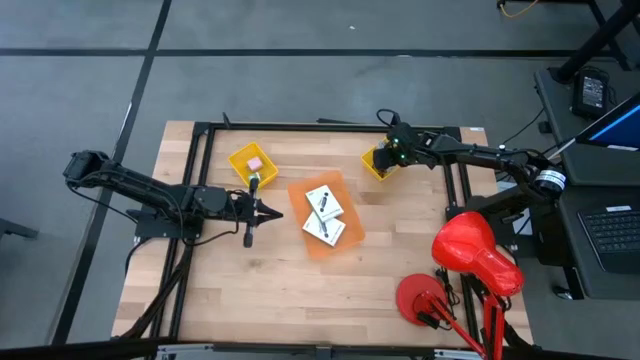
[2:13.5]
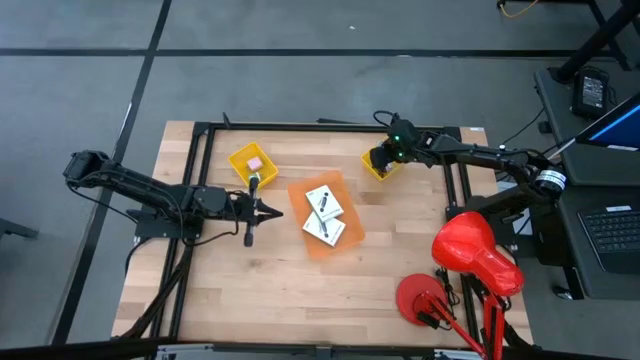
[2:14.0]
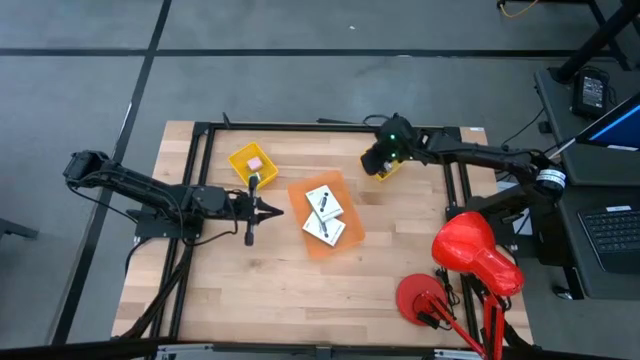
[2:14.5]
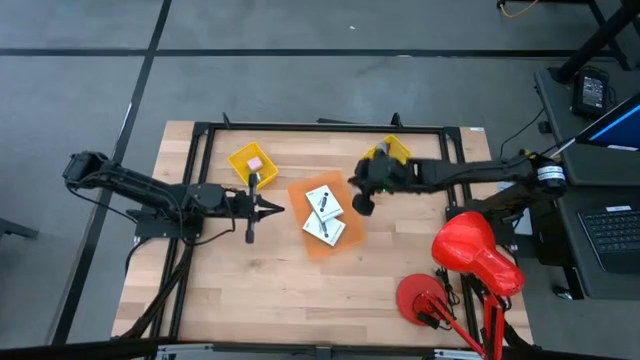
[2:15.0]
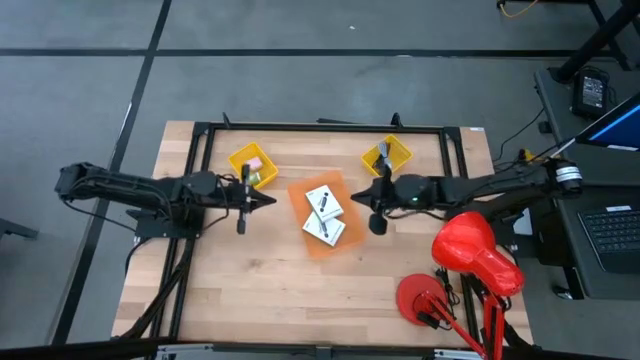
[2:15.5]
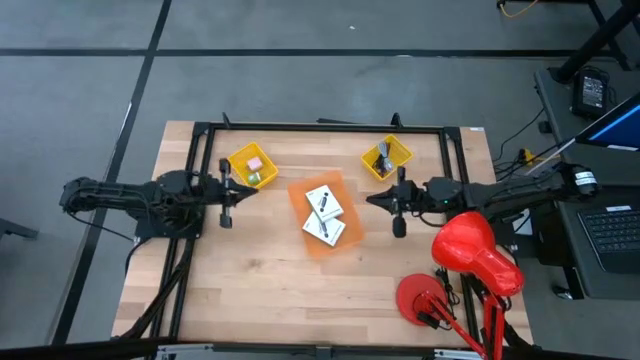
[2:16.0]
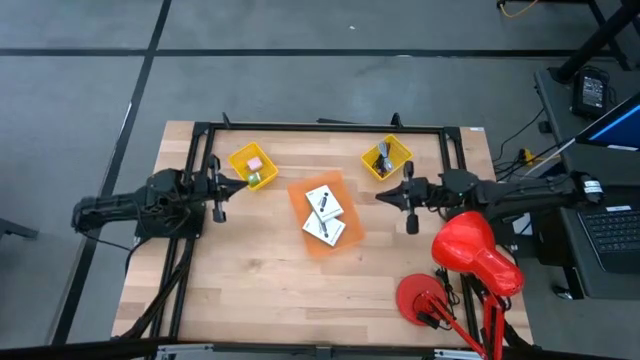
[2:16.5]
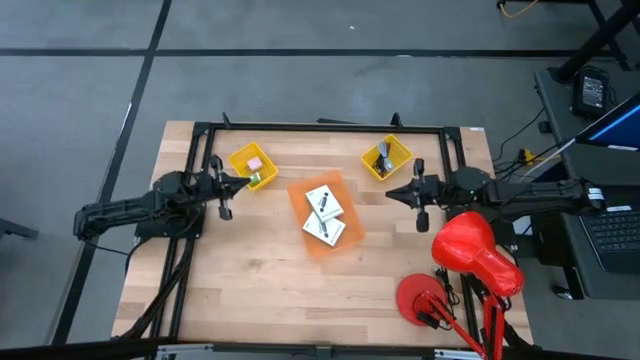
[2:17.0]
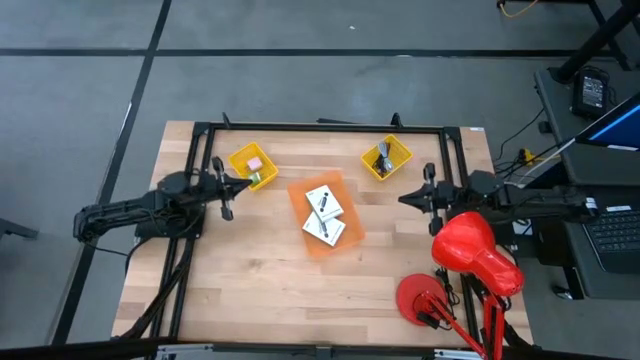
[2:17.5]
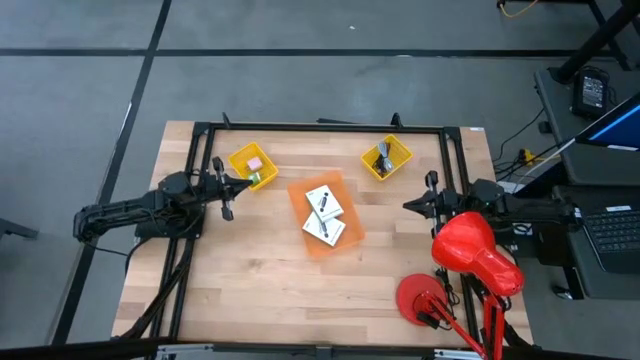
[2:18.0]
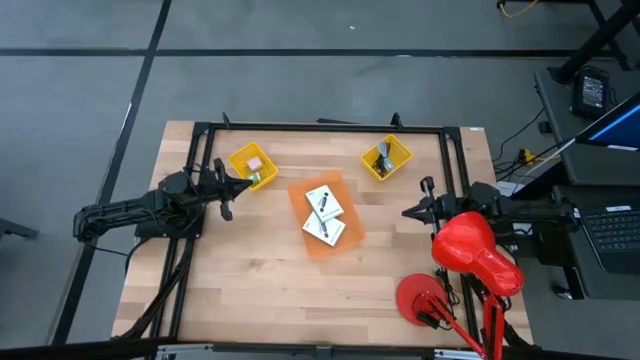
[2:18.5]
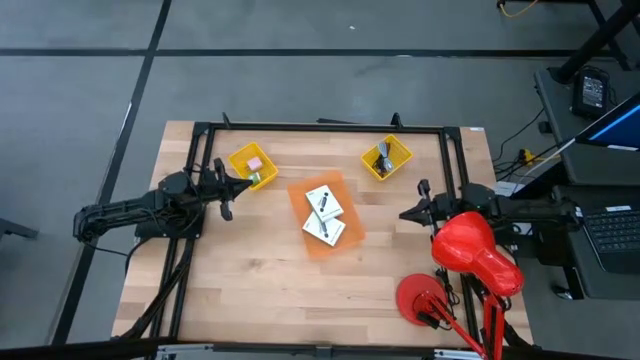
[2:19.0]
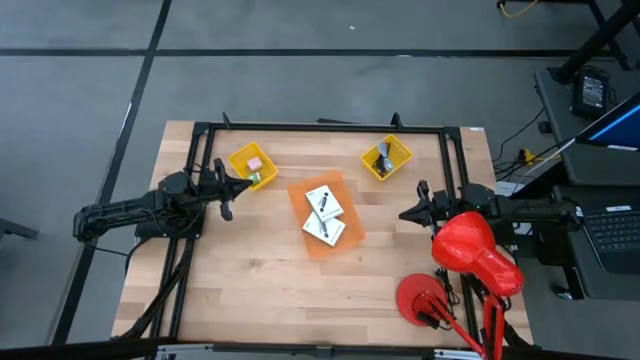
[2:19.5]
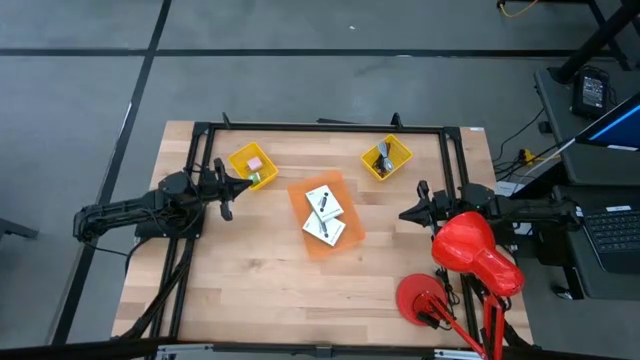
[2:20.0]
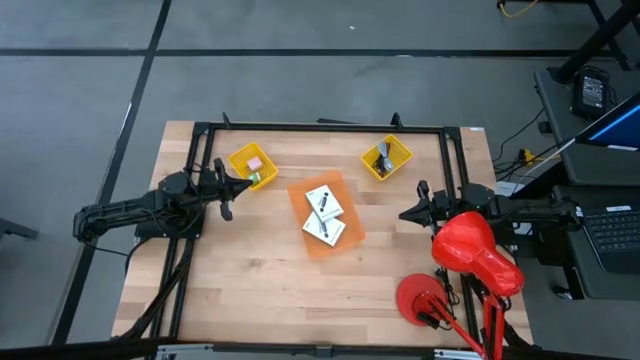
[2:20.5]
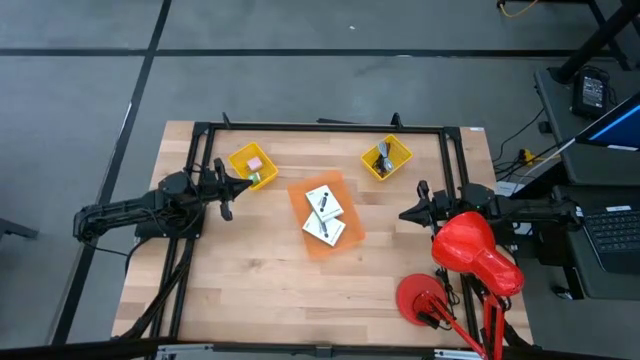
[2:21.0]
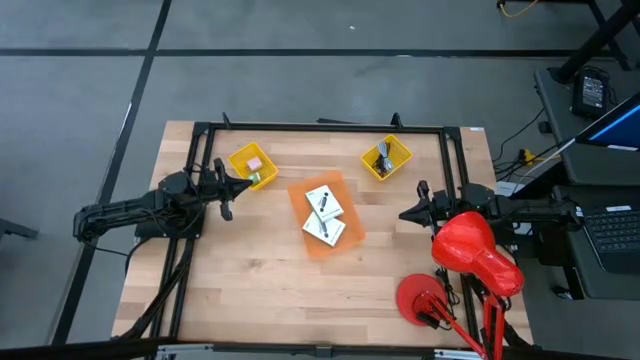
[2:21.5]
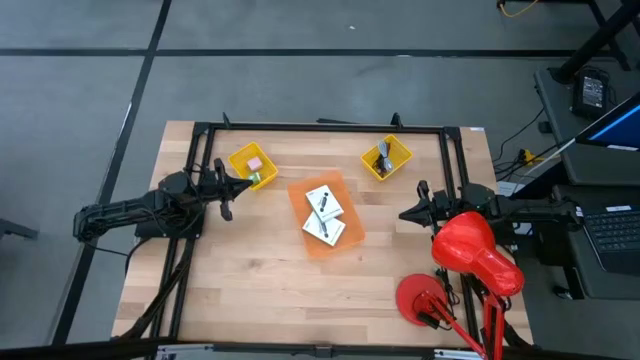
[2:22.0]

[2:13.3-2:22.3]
Task: Pick and place items into bin
Return to Home Position

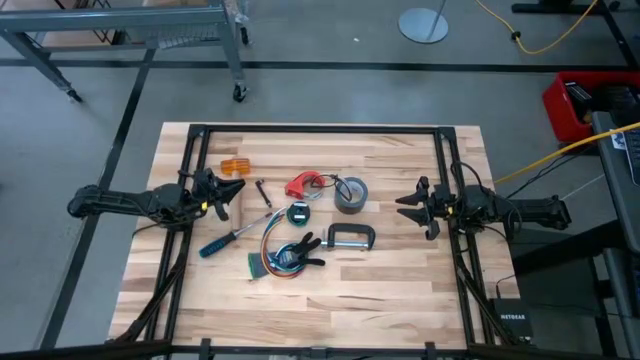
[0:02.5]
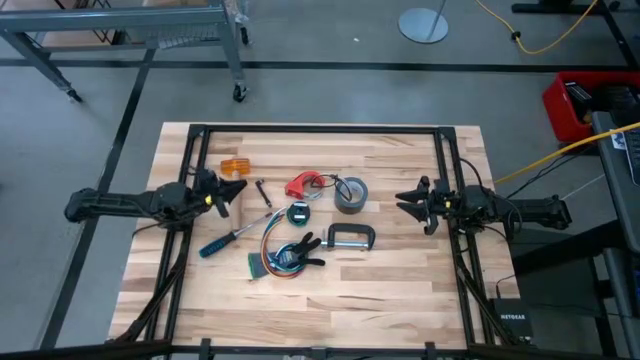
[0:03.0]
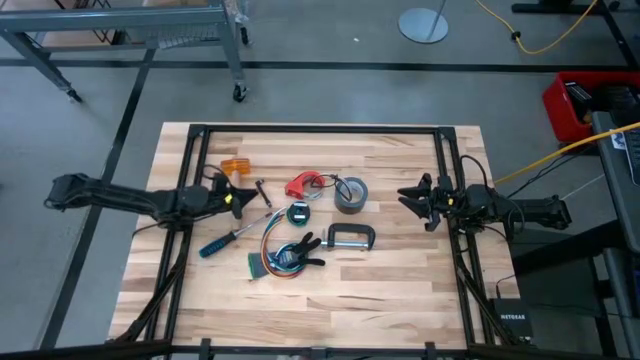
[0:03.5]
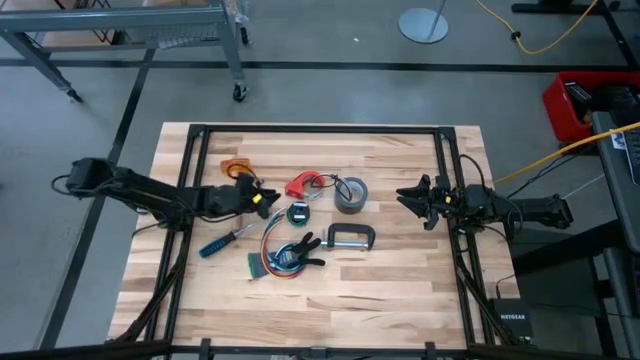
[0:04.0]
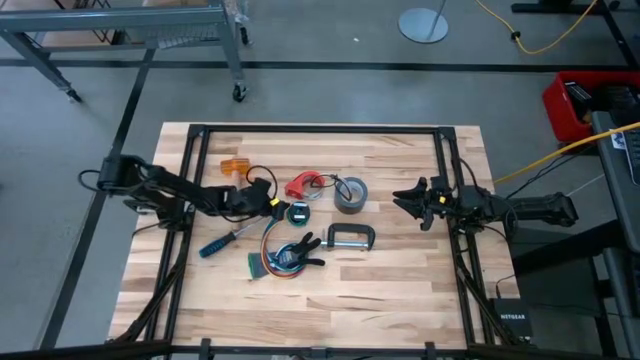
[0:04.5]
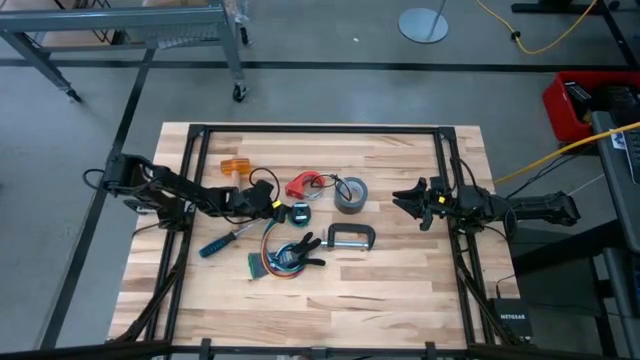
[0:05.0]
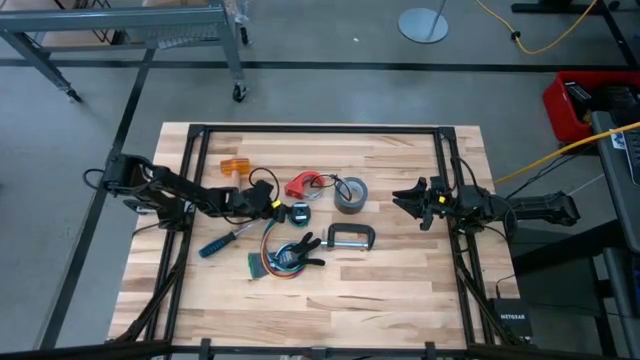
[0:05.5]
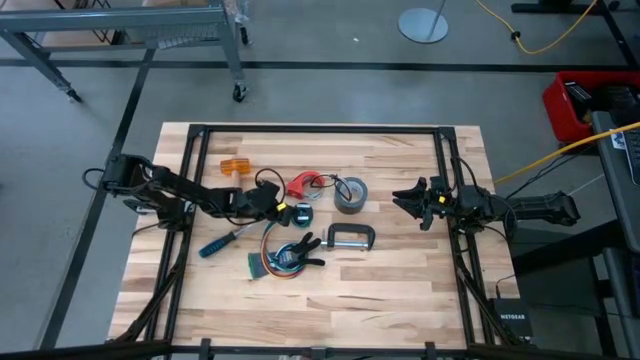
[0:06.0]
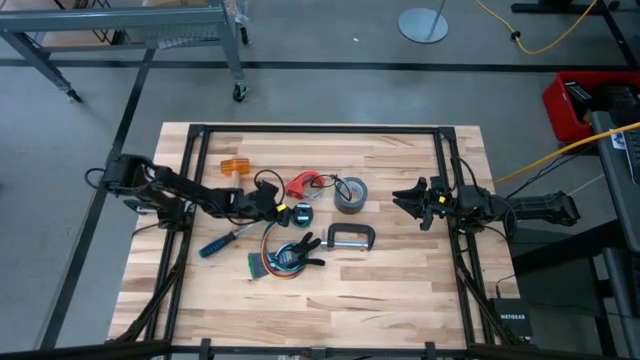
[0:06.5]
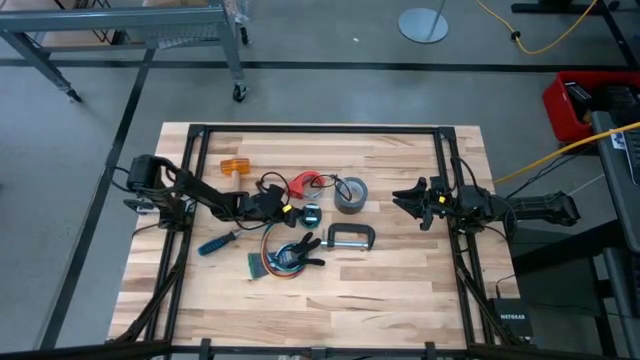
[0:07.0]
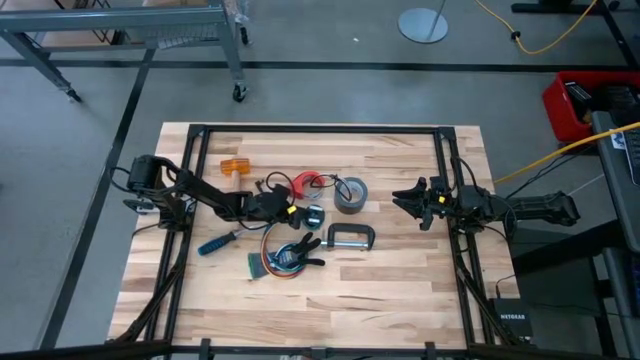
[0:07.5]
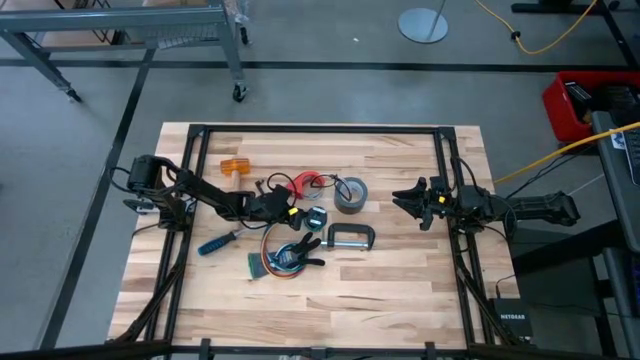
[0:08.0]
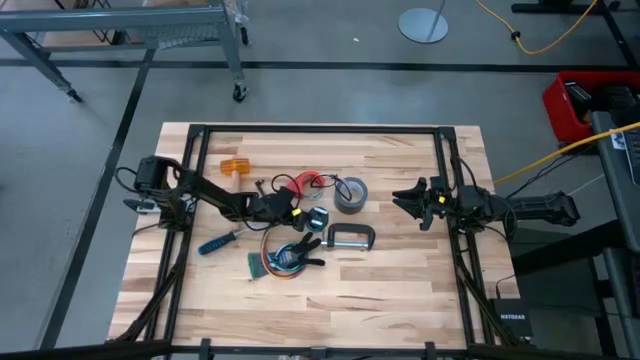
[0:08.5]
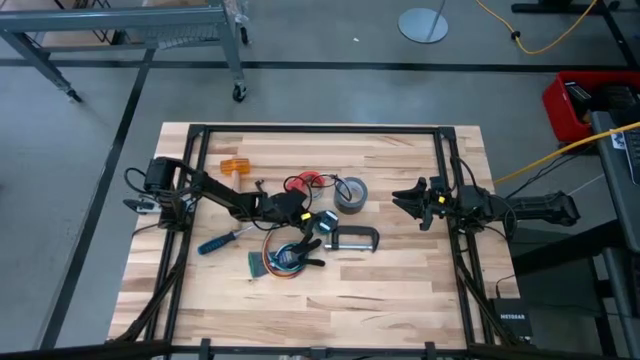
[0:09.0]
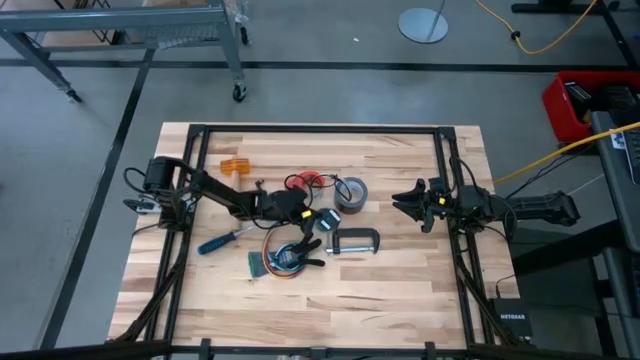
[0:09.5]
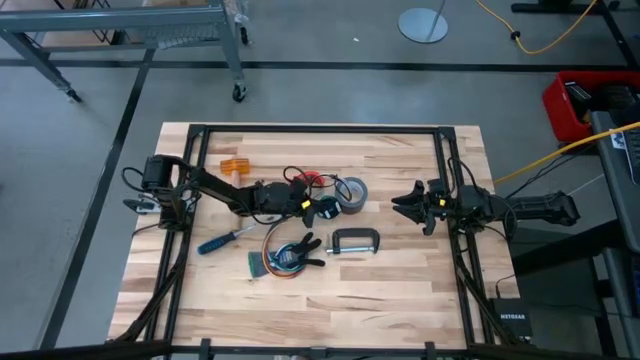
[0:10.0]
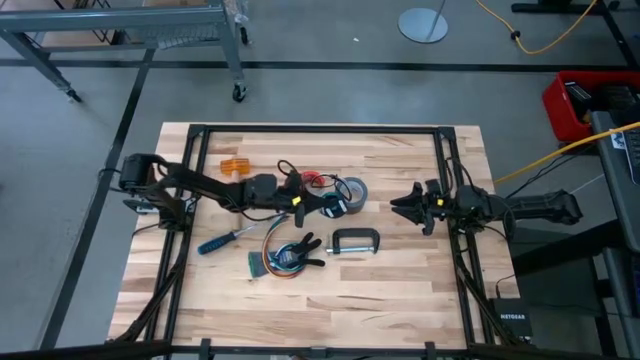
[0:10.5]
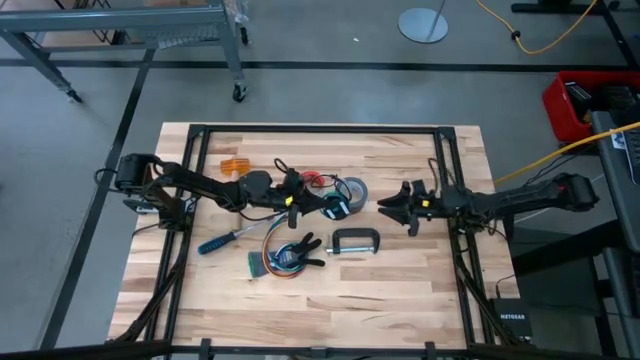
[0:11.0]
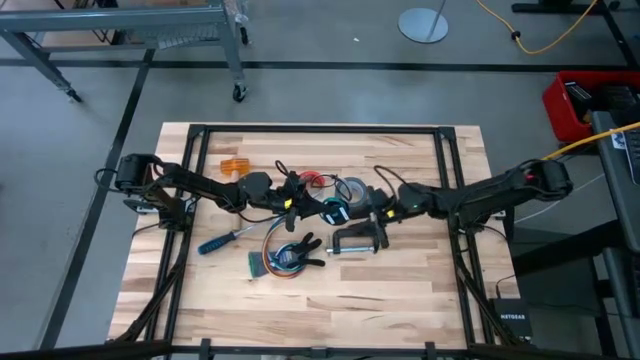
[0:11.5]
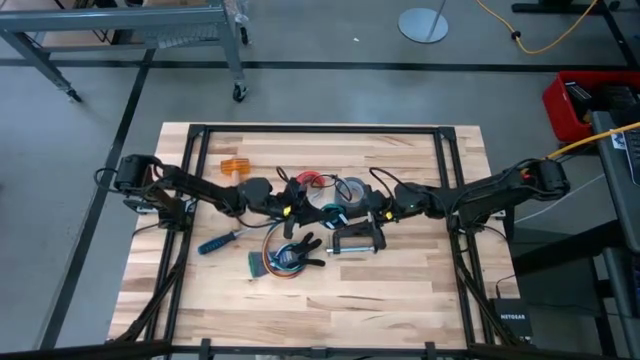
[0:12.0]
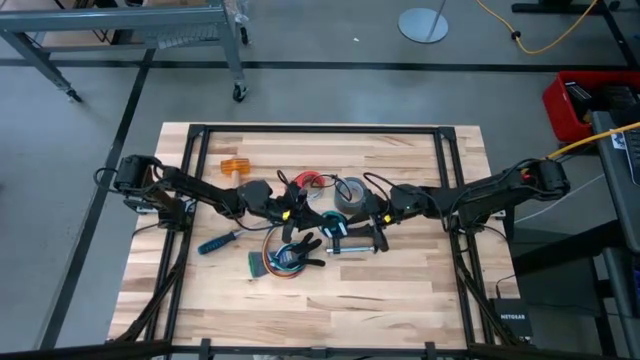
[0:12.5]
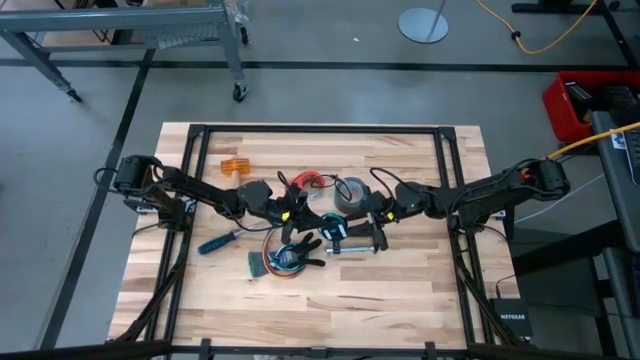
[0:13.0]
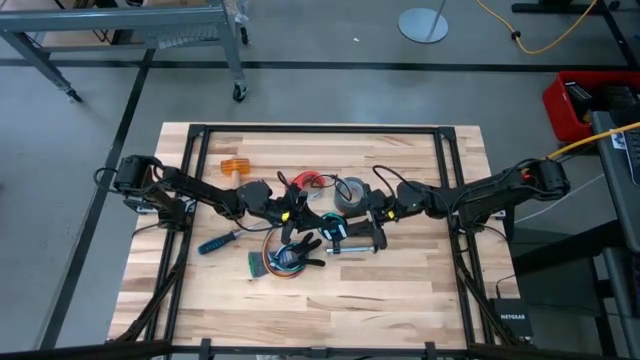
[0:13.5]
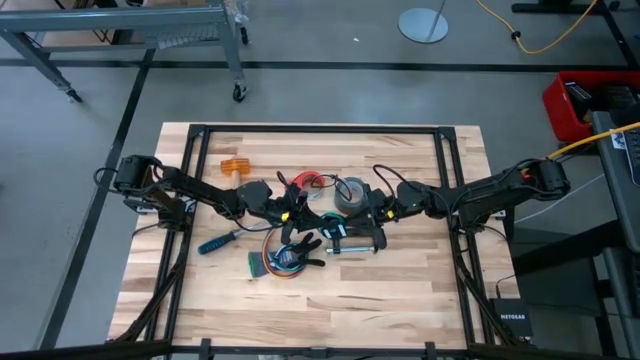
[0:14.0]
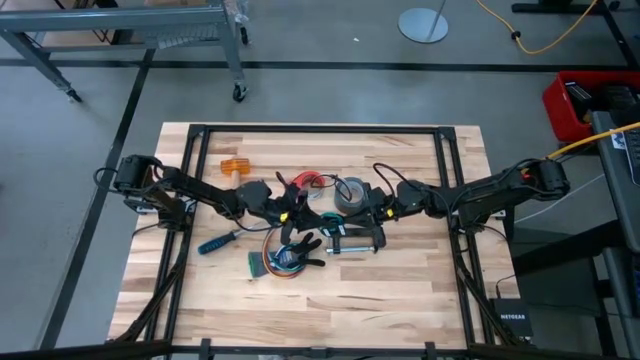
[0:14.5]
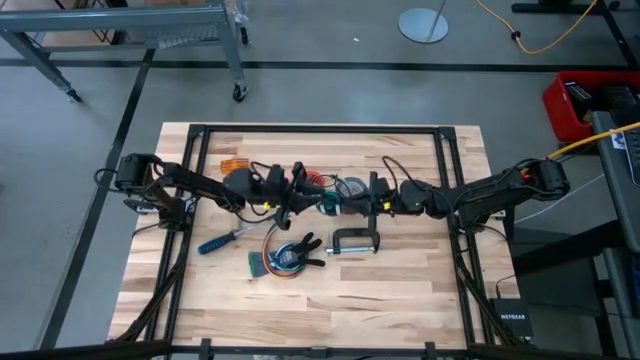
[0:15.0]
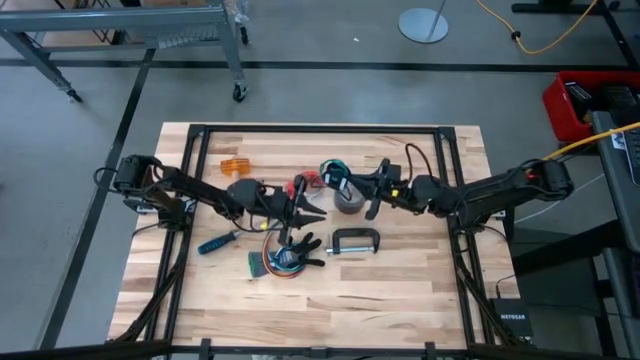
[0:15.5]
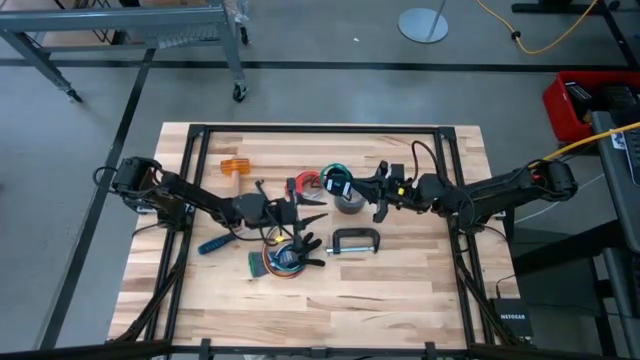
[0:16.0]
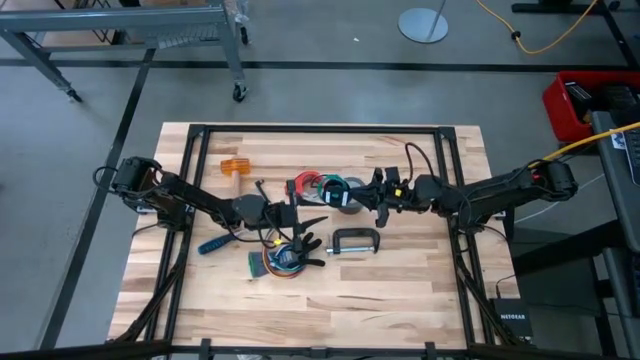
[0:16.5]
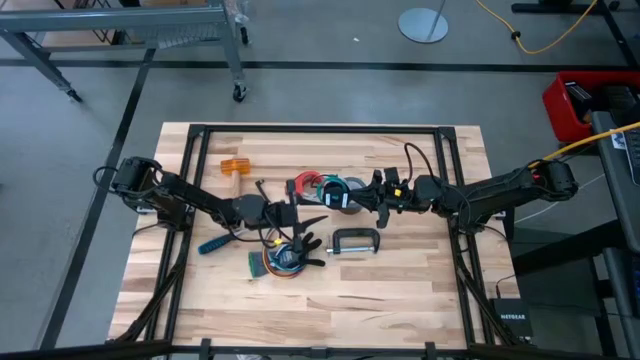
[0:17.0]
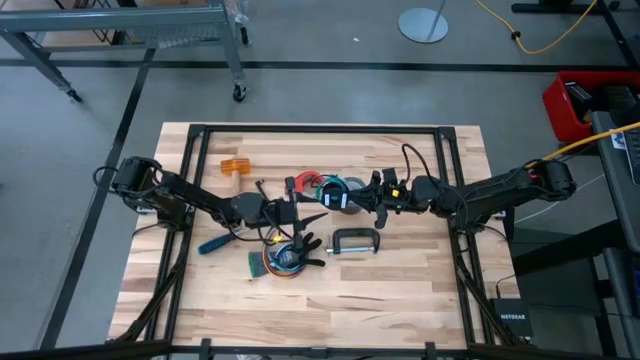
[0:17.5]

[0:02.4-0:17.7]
Task: Coil cords
Uncoil the blue wire from the spool
